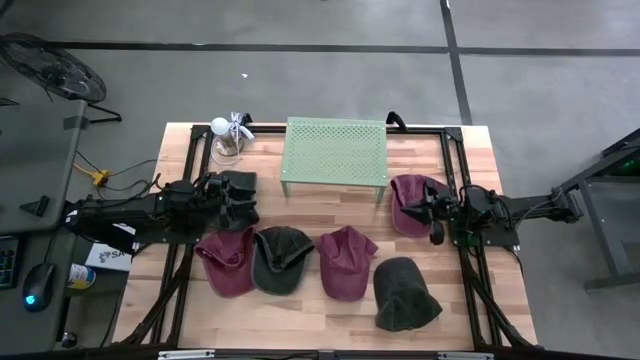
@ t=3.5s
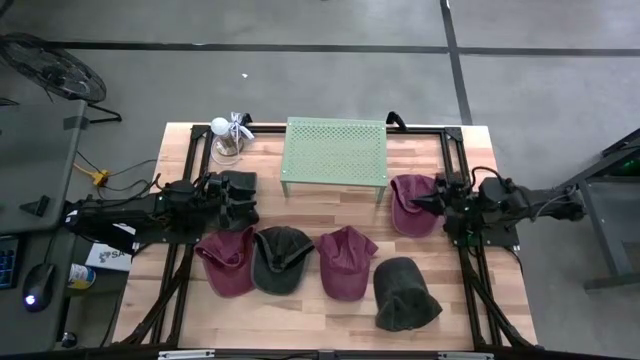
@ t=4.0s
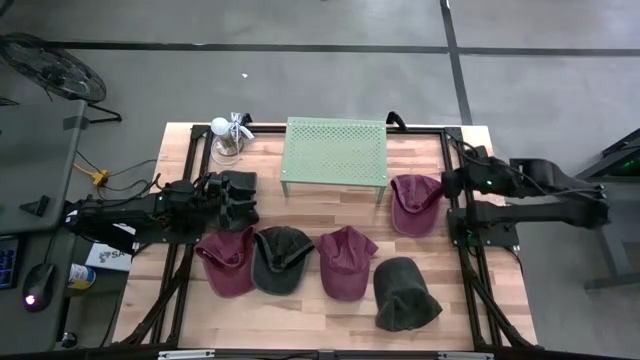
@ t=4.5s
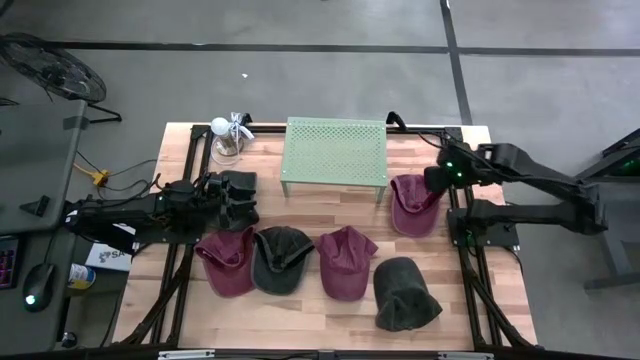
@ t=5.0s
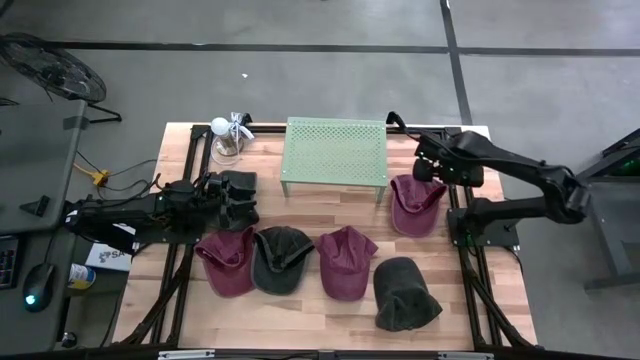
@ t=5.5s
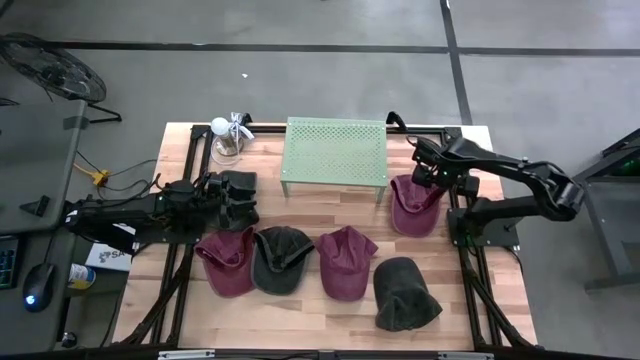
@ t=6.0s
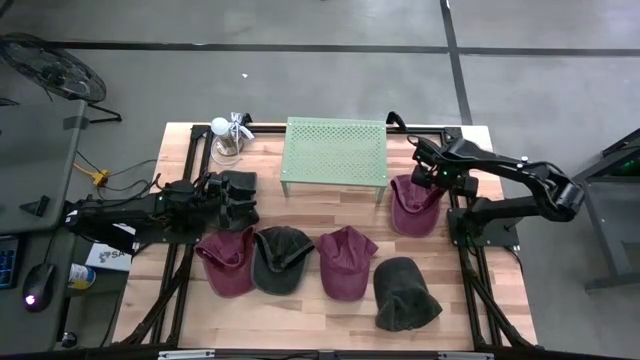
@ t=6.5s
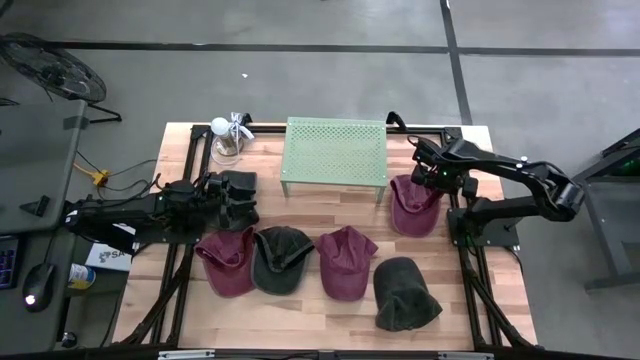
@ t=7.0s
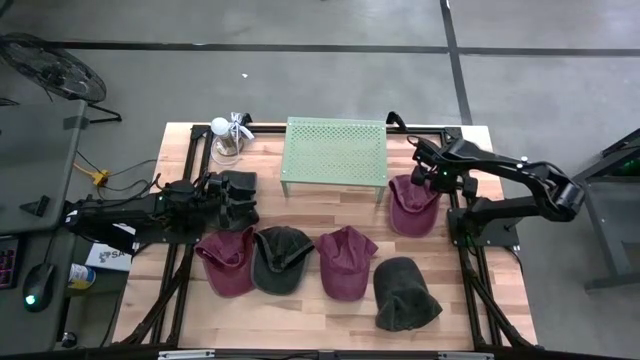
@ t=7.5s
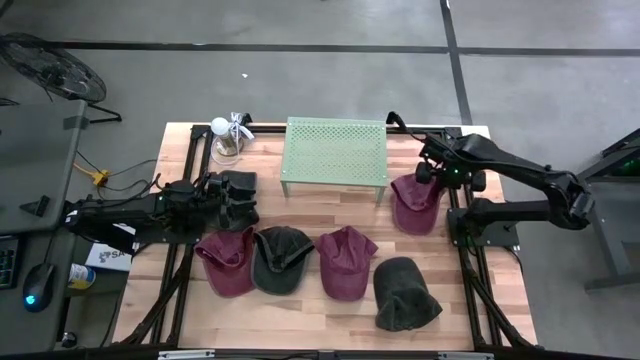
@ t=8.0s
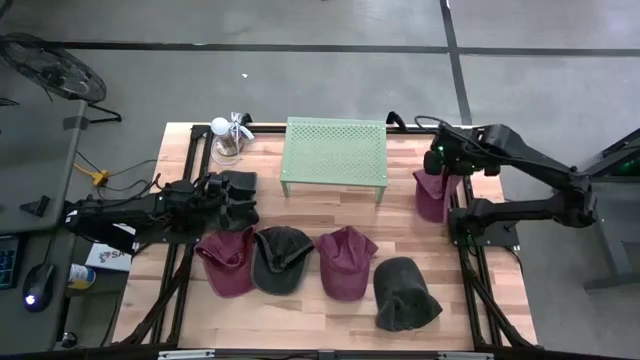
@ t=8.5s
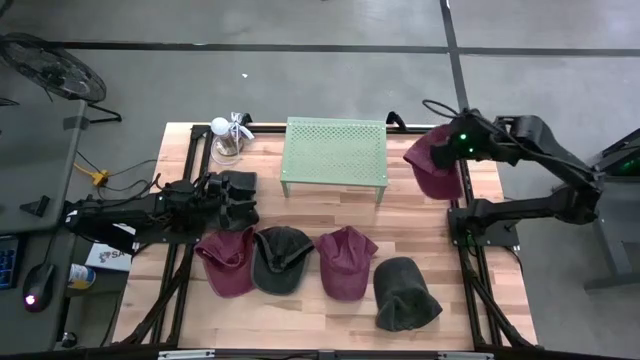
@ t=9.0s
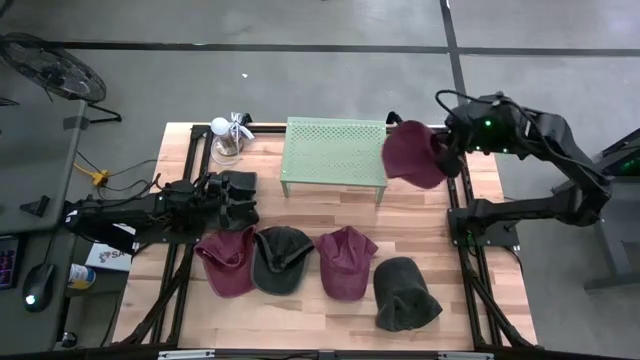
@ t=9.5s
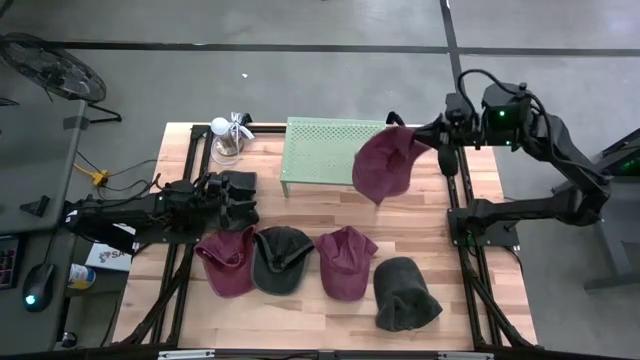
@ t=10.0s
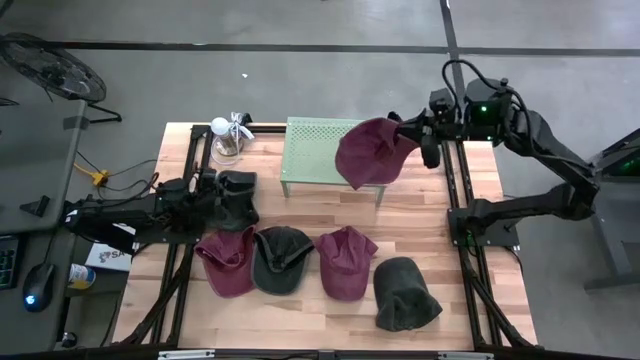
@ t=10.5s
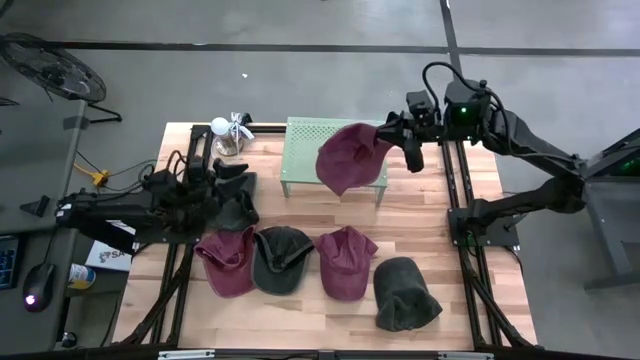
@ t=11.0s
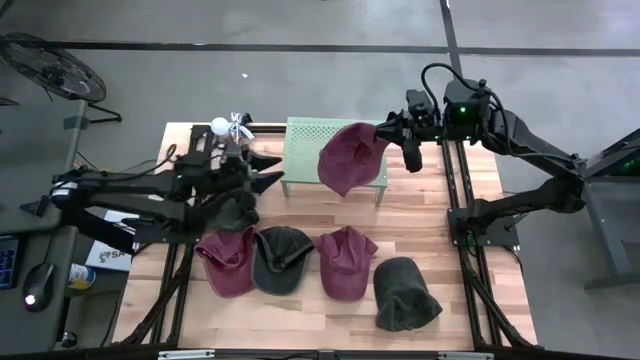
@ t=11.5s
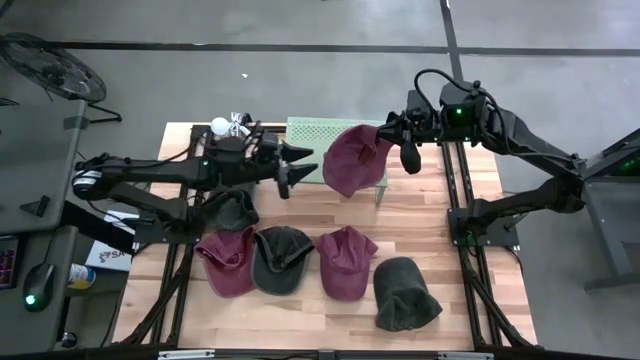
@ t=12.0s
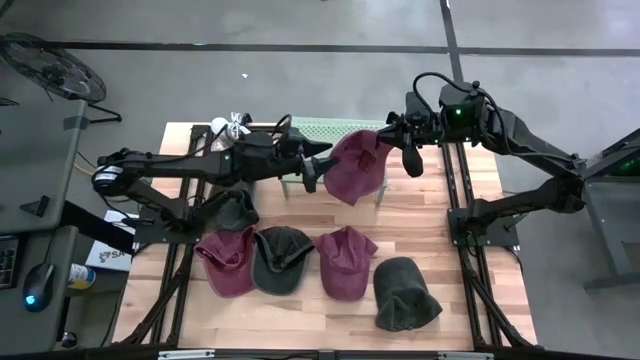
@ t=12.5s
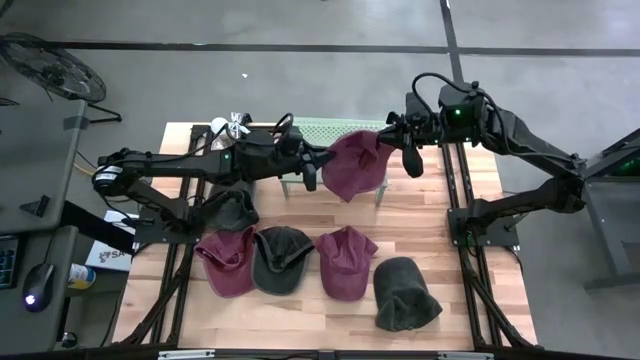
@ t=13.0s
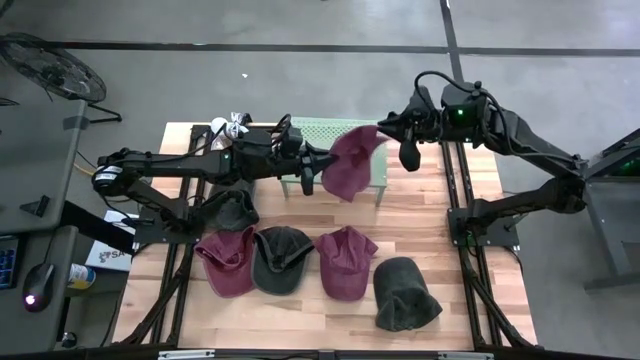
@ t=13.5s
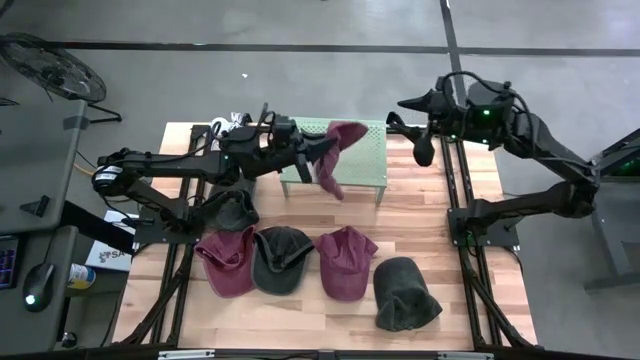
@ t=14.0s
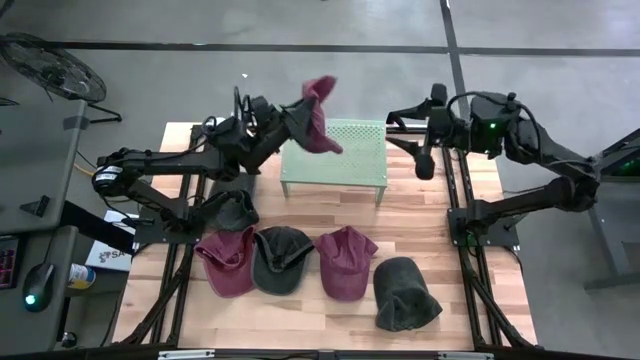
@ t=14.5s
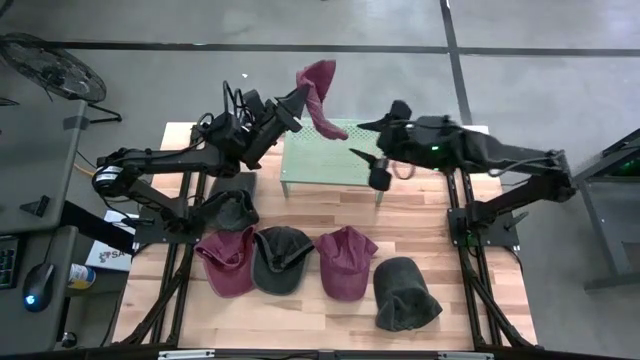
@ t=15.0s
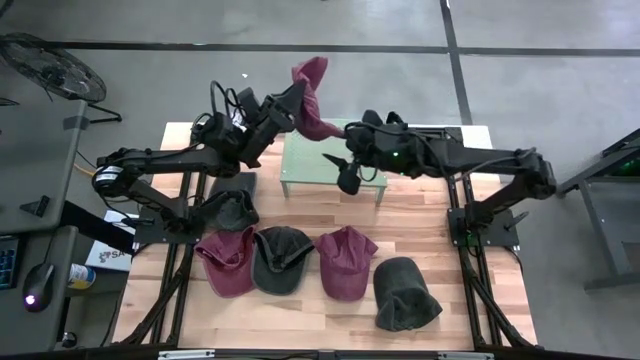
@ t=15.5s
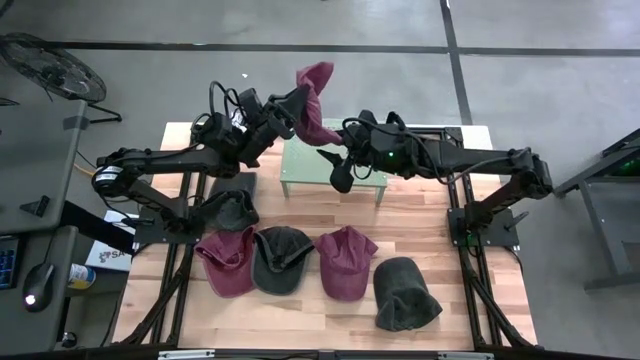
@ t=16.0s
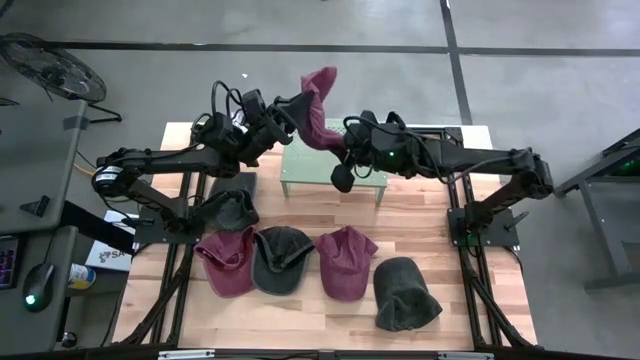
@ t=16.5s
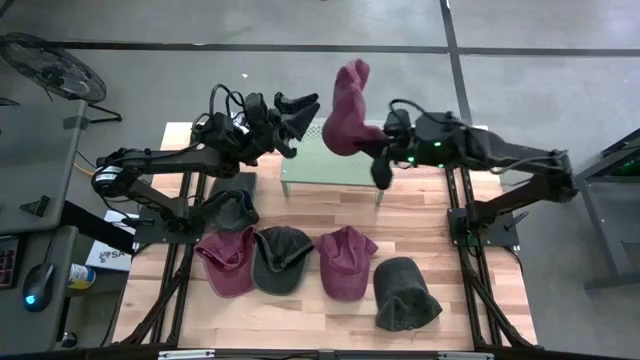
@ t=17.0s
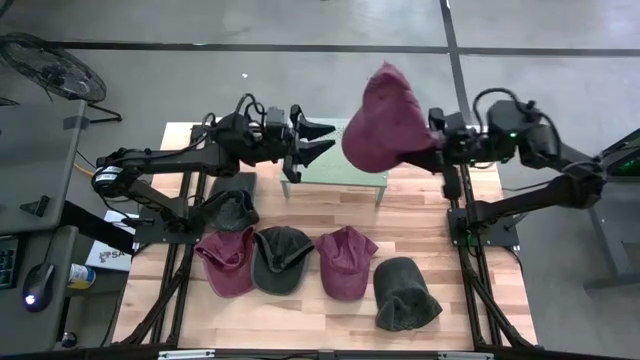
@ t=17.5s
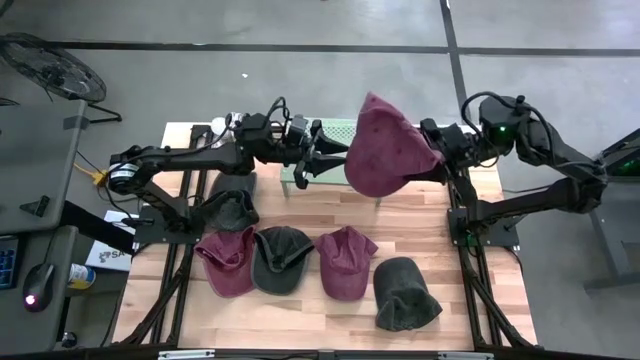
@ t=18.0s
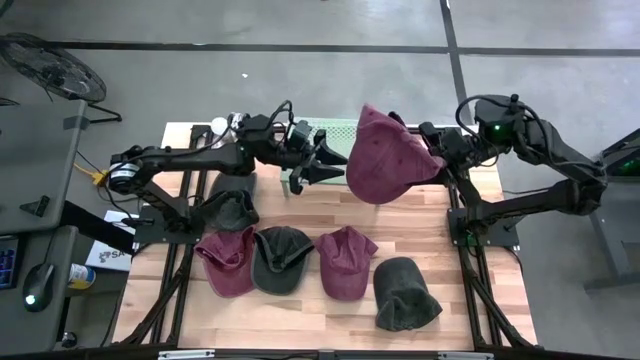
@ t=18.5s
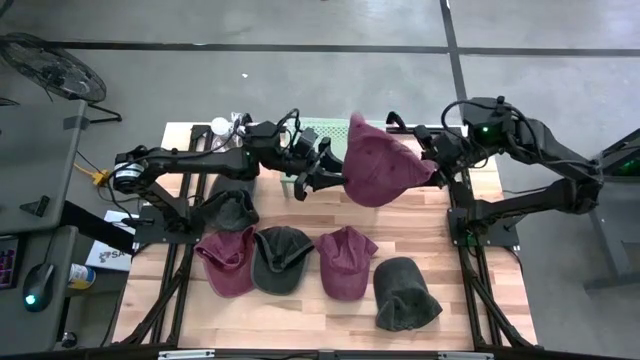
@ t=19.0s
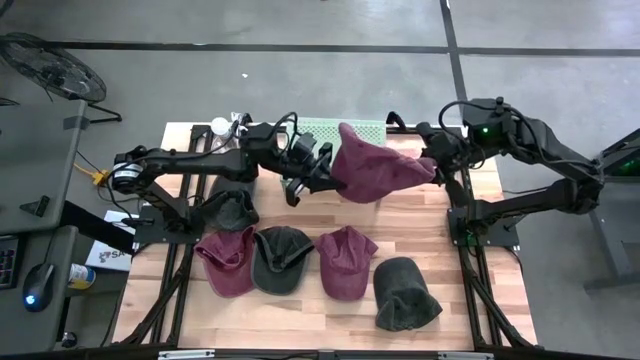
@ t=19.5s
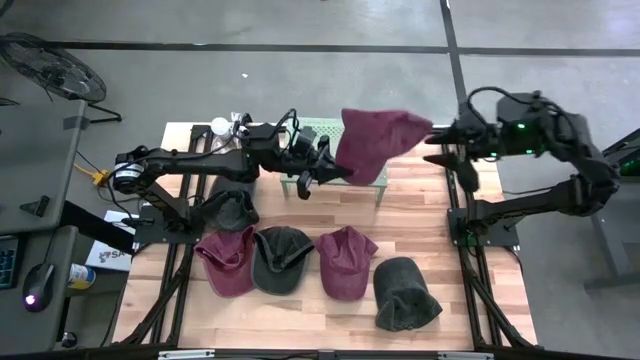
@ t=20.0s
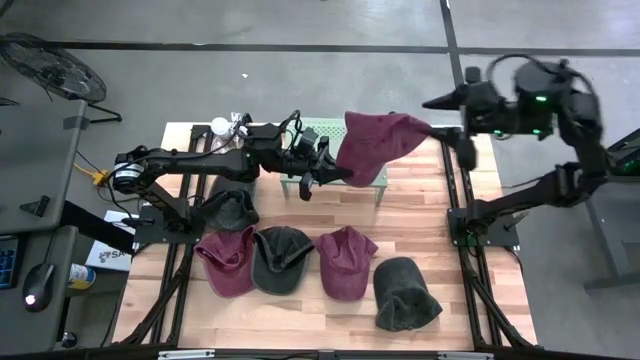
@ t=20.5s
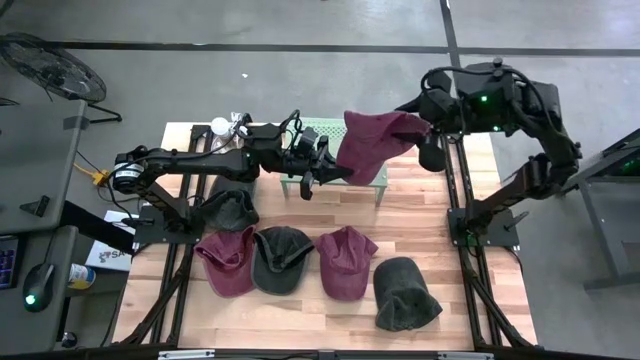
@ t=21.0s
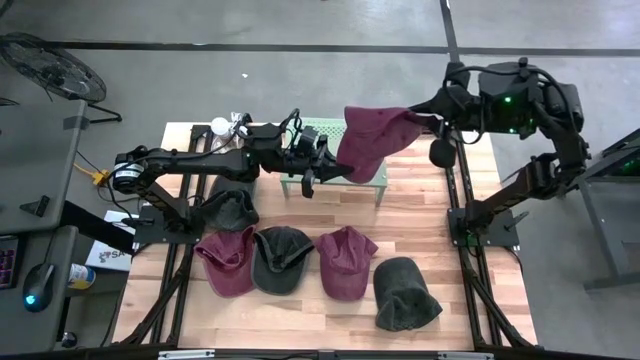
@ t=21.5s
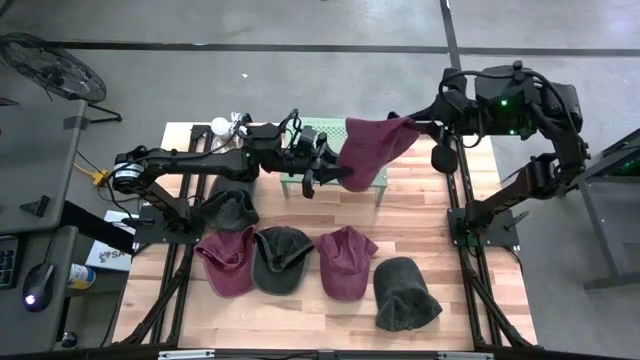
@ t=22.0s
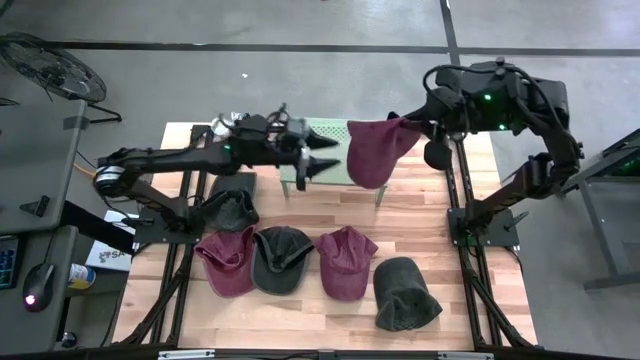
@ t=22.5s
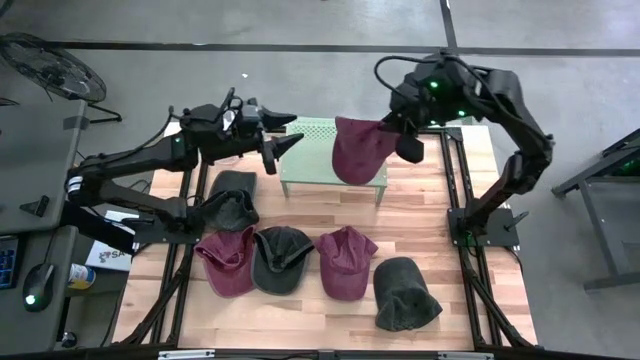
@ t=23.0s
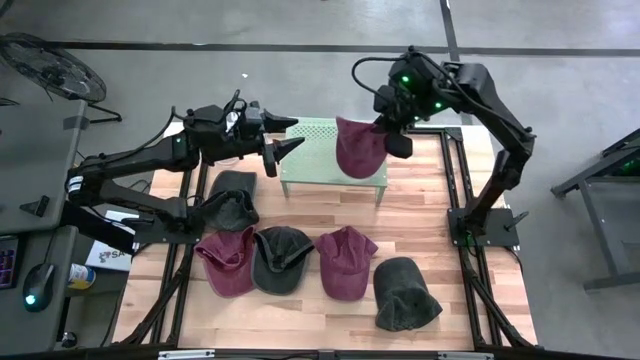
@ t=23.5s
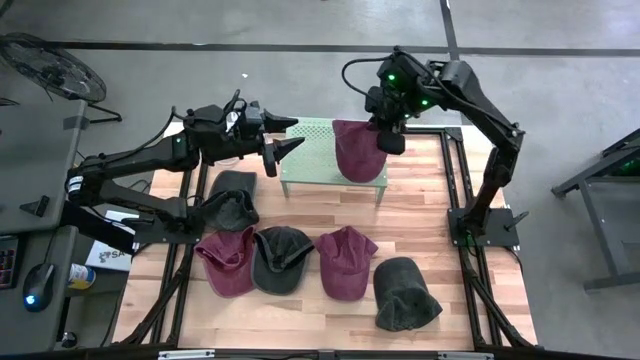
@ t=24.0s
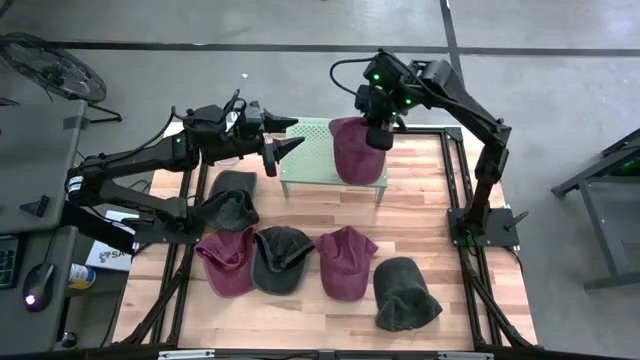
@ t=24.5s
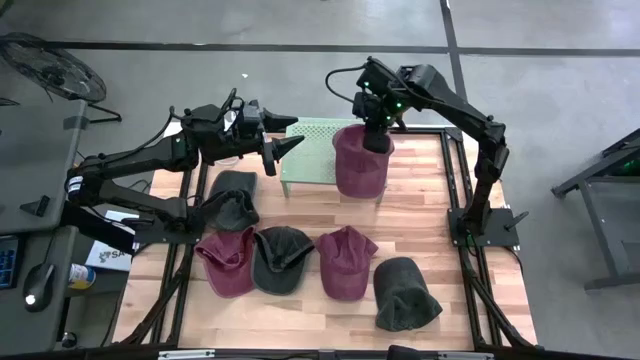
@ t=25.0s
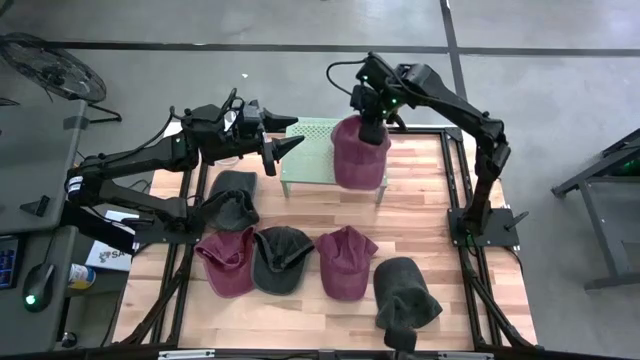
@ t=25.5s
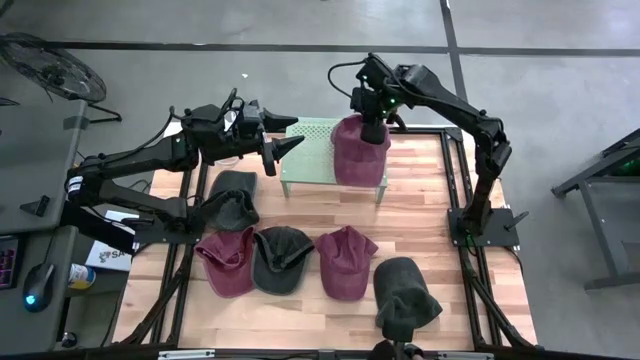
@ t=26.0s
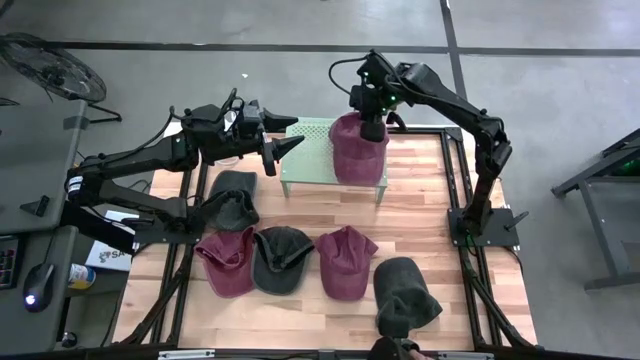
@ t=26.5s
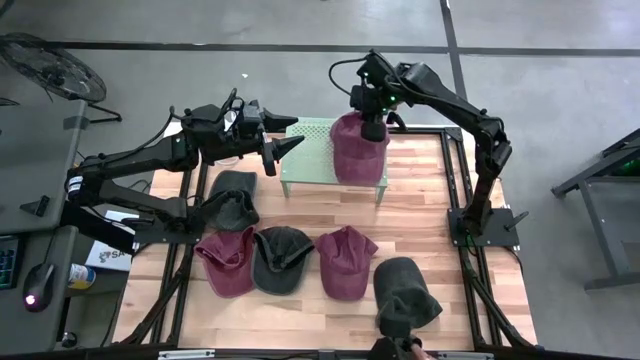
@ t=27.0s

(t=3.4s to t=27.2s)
Task: Pick & Place hat
Put the top dark red cap on the shelf
